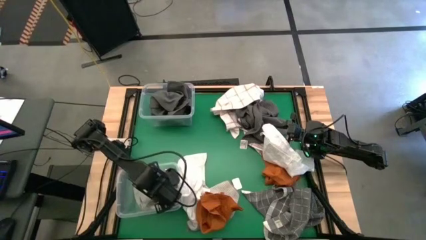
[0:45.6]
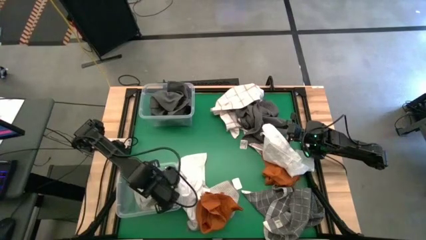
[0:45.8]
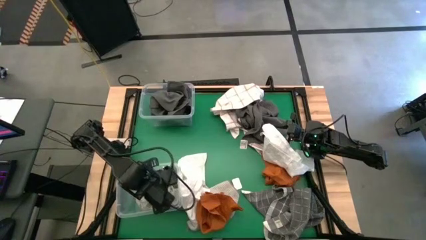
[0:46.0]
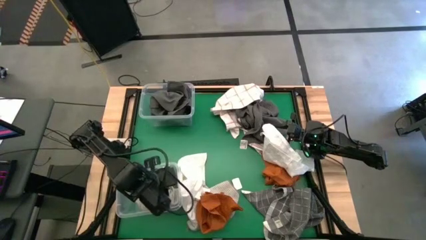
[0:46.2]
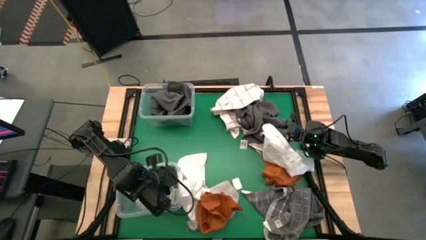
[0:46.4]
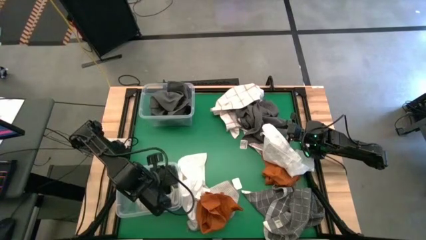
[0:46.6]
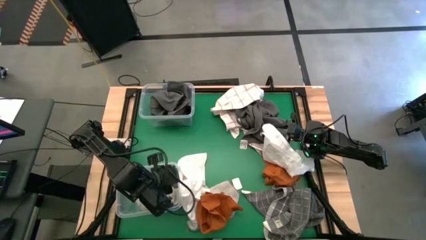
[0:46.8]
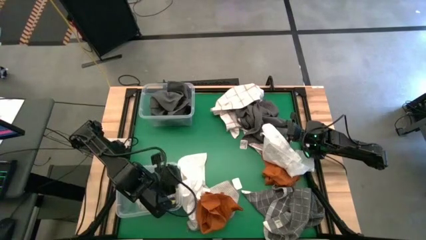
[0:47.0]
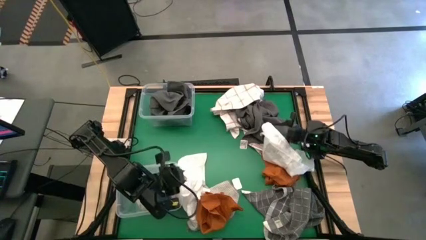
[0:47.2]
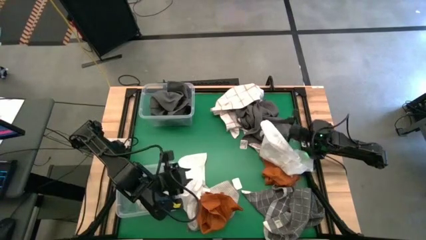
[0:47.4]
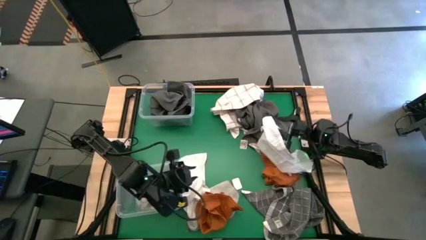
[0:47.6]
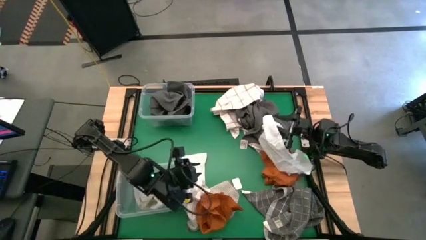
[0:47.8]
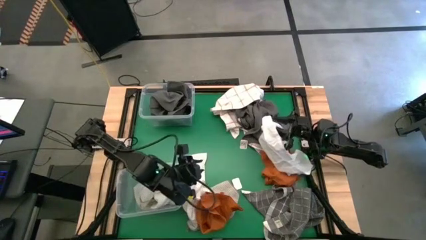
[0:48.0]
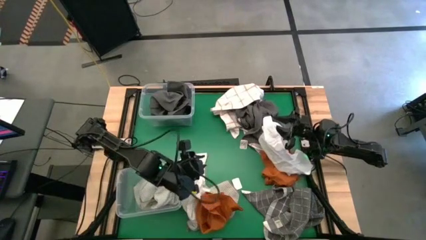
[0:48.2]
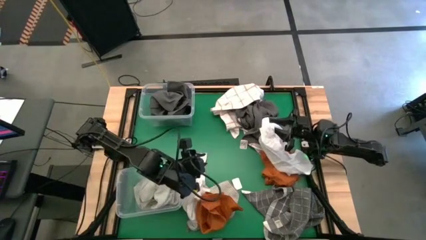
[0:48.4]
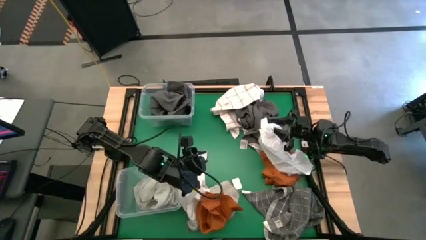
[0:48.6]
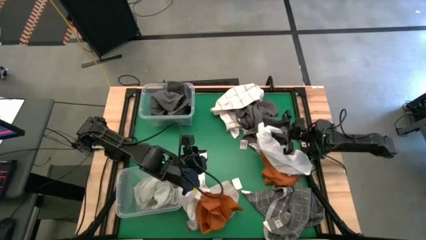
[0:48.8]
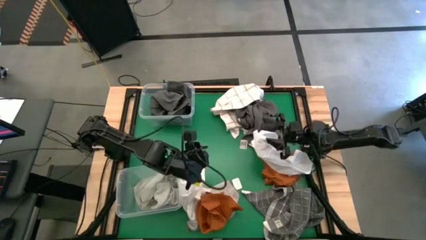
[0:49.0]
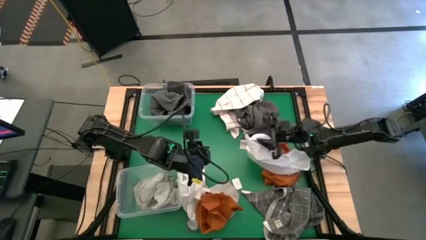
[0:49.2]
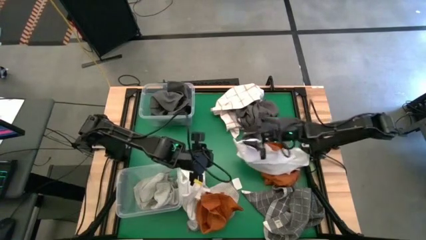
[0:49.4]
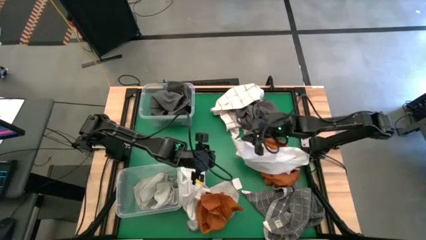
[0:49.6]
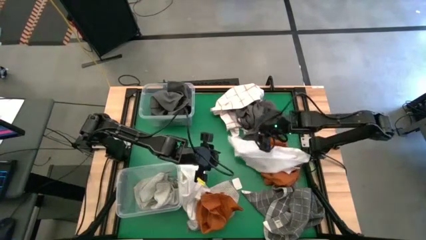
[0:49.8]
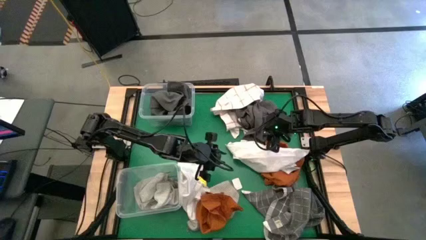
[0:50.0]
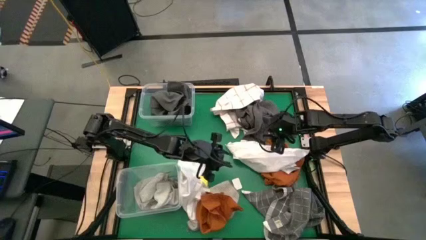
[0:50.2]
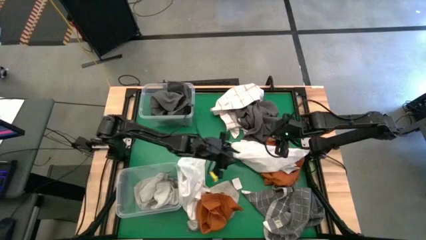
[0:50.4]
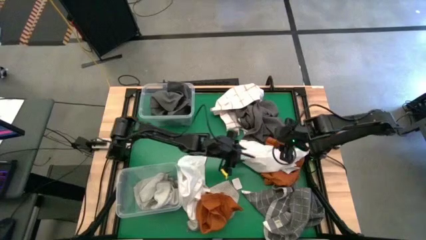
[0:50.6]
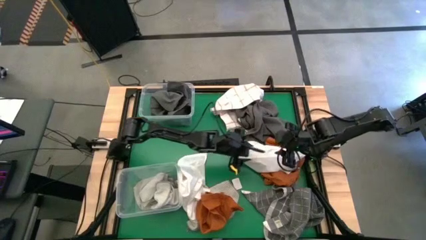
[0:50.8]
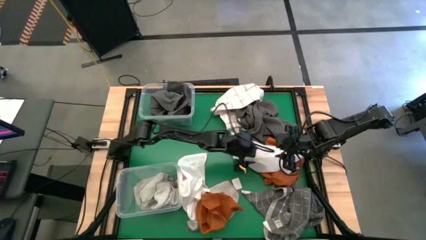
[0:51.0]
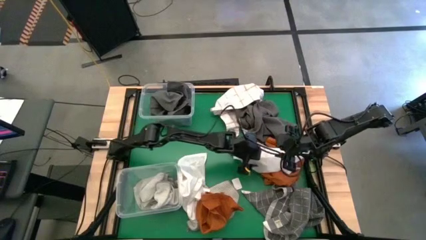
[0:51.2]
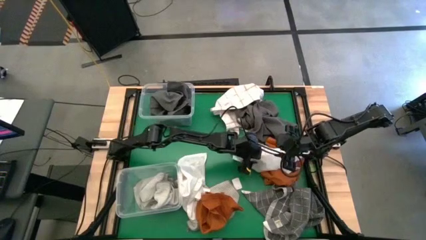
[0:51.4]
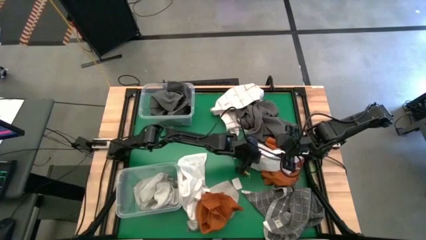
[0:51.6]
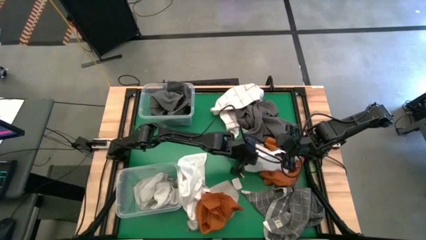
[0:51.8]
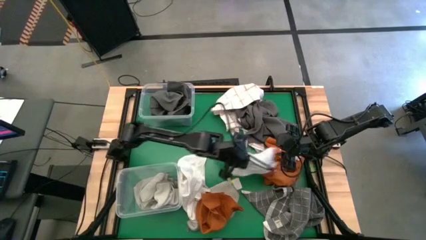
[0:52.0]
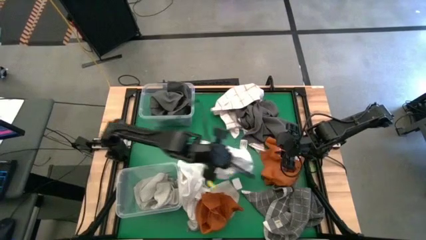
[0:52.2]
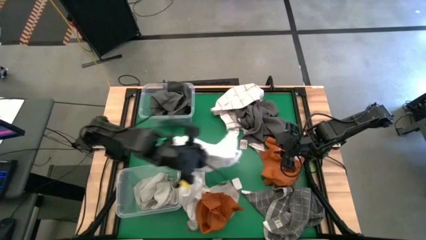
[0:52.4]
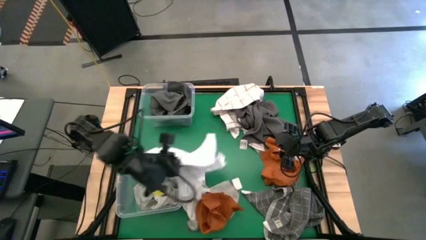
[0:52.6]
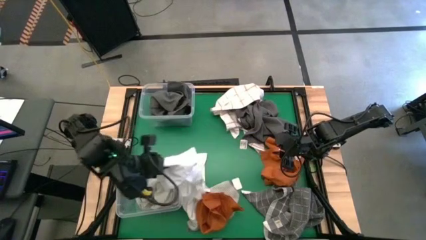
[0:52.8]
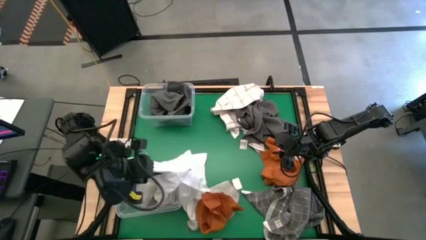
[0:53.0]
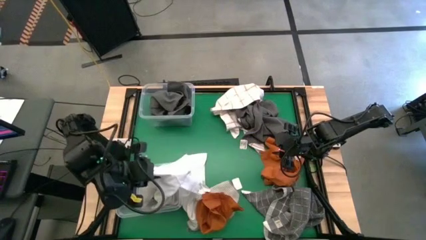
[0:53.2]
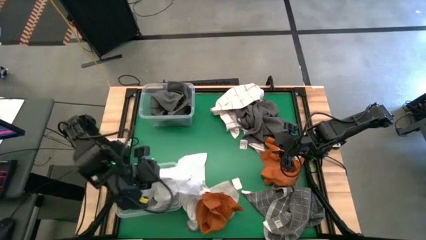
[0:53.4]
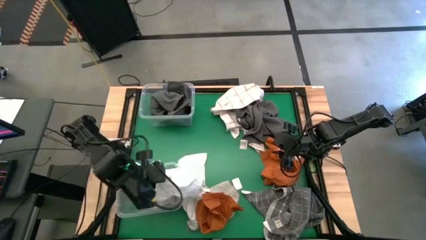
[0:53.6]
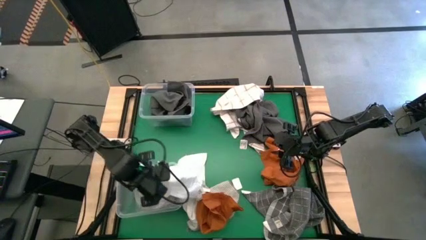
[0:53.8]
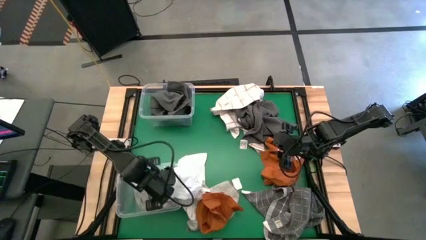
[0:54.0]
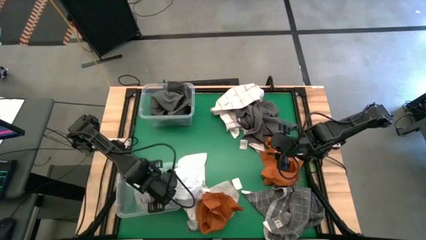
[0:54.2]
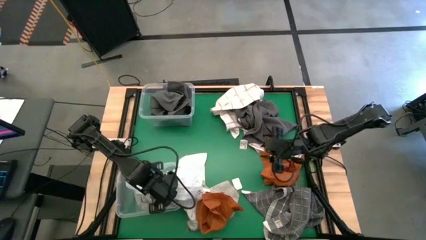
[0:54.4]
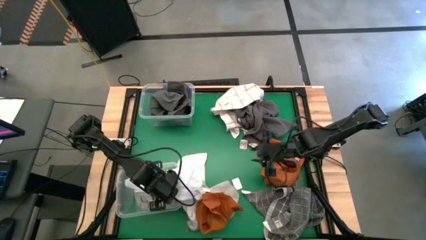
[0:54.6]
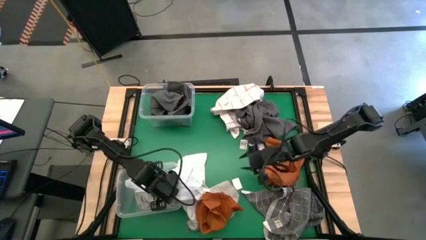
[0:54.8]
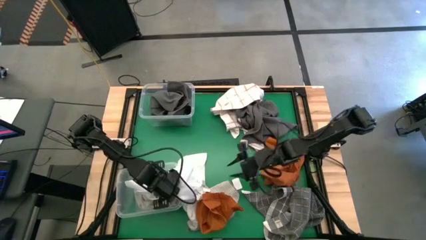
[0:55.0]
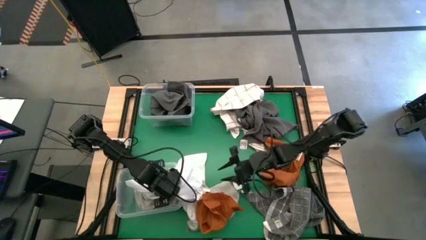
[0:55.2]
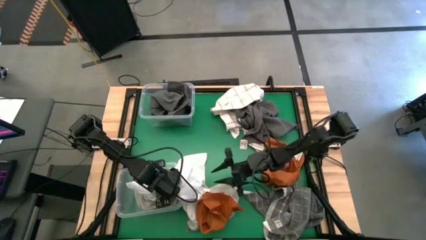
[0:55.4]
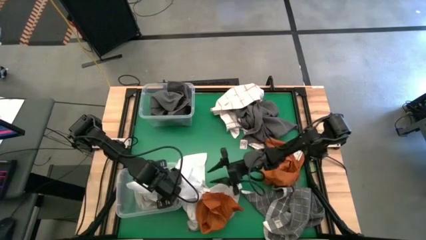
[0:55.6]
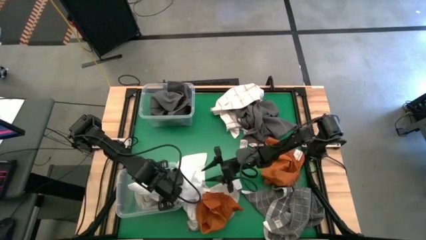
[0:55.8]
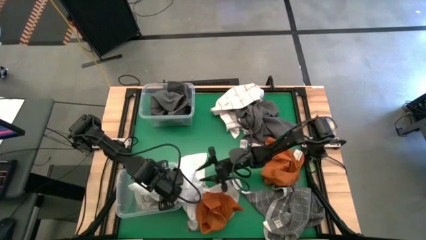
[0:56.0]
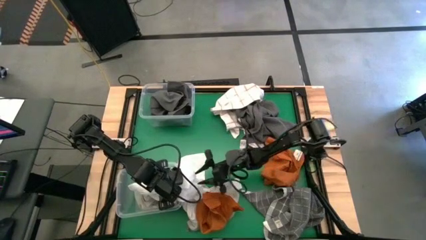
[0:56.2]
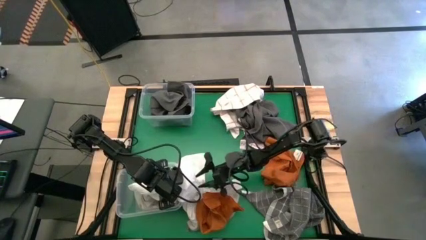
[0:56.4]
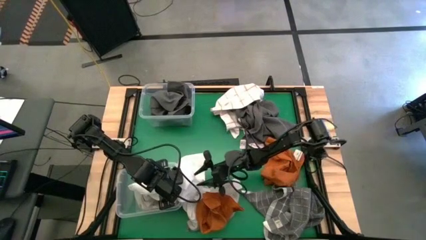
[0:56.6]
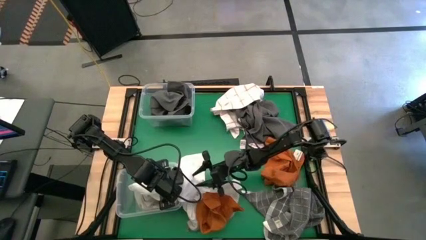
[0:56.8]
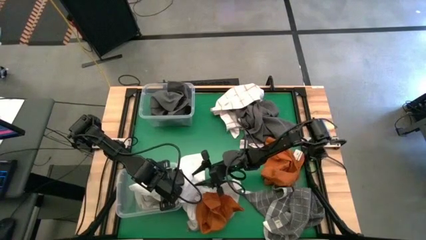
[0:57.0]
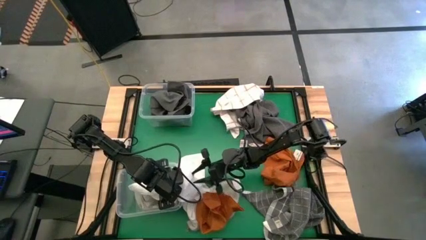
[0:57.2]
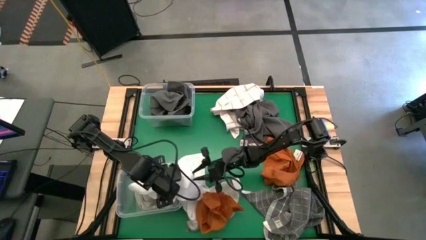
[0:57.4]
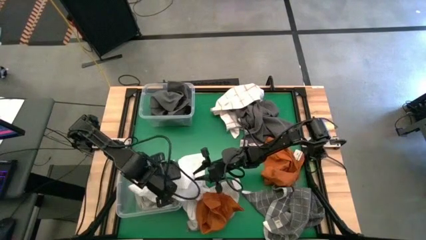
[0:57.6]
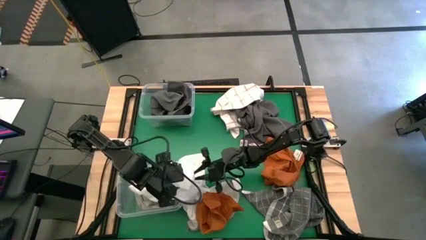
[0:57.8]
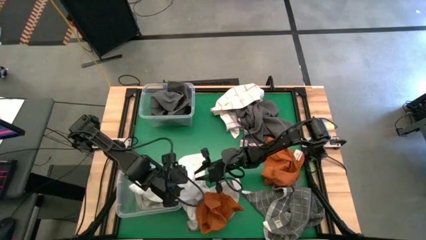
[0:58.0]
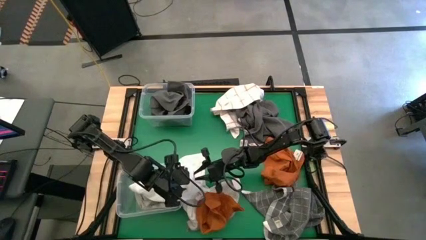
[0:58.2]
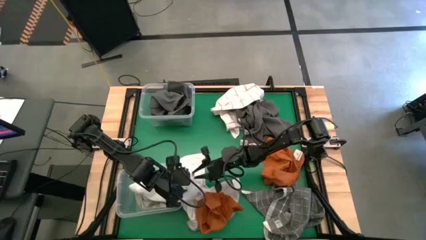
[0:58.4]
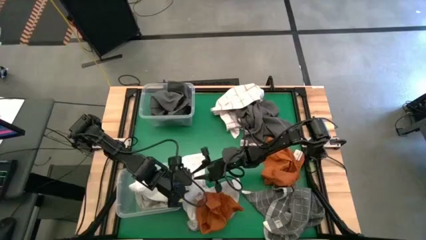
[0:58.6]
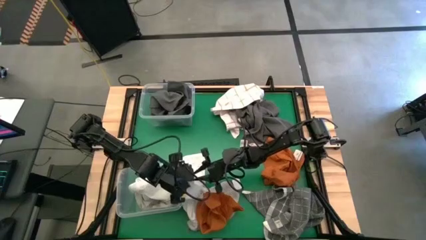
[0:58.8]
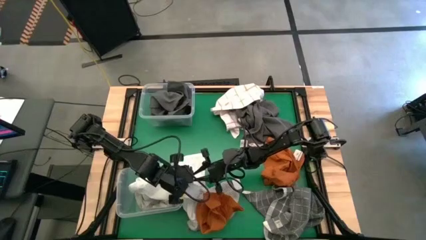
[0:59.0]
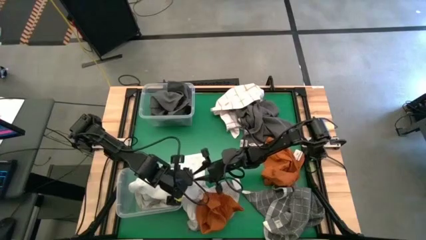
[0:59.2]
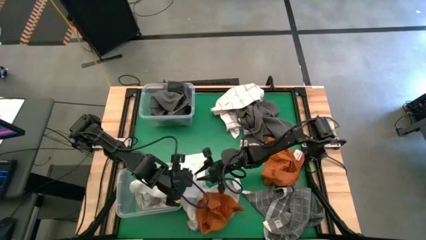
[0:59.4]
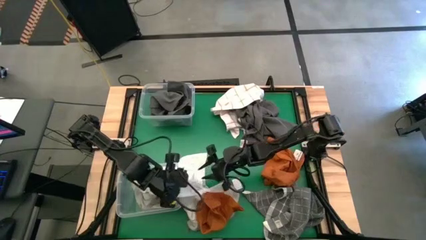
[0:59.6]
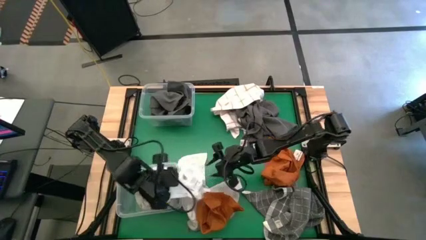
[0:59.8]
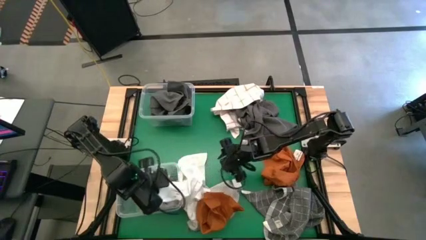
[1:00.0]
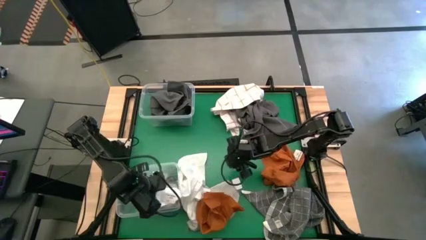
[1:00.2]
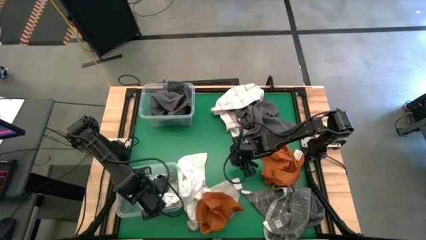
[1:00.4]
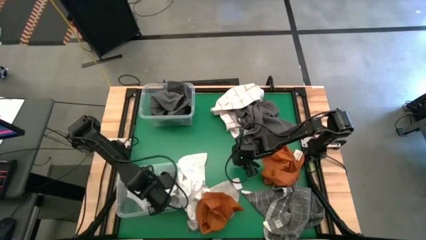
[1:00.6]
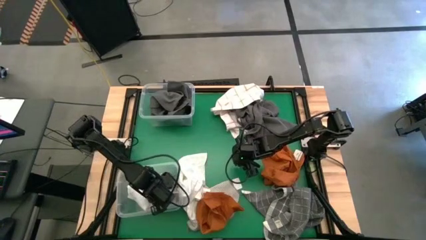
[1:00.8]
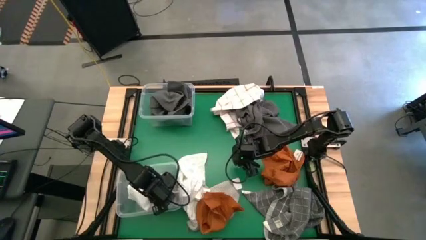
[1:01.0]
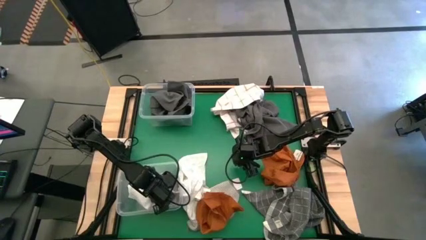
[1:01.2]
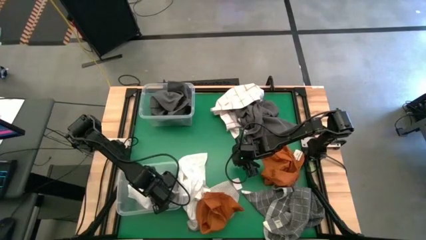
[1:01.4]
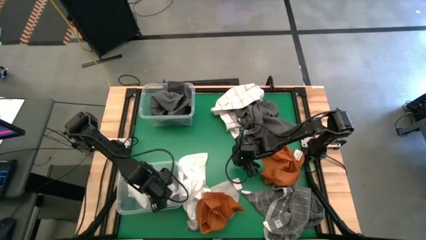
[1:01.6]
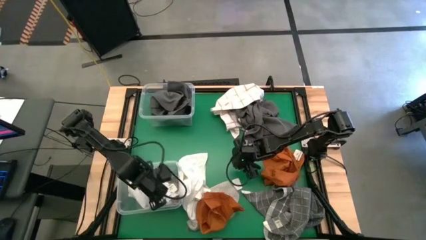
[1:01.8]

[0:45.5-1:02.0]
Task: Sort towels by color in basket
Put the white towel into the bottom transparent bin
